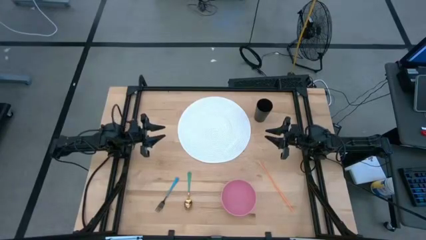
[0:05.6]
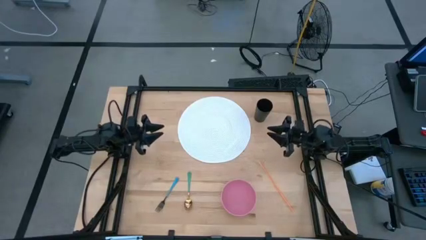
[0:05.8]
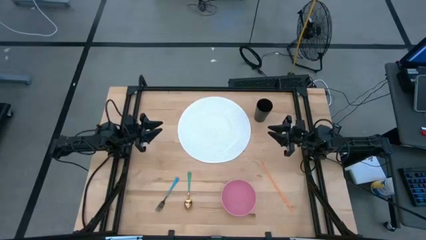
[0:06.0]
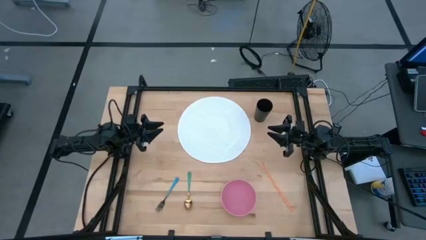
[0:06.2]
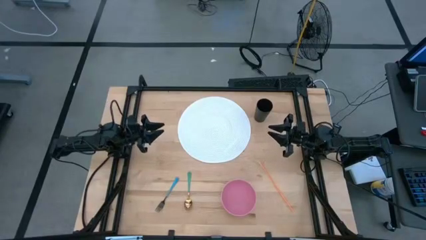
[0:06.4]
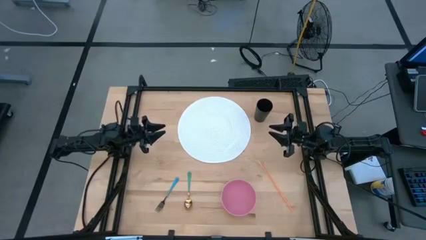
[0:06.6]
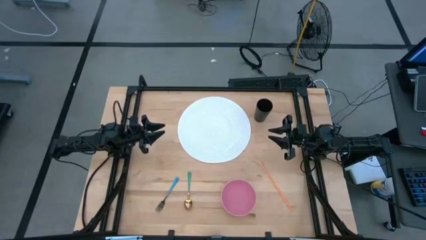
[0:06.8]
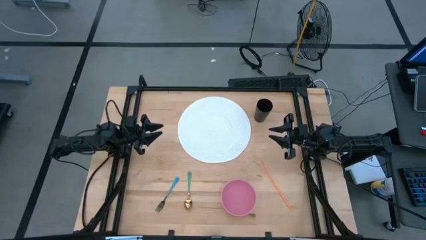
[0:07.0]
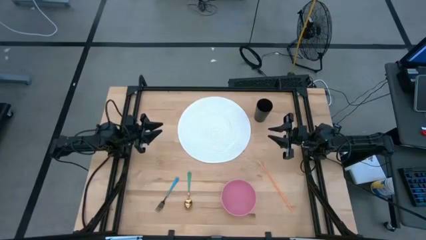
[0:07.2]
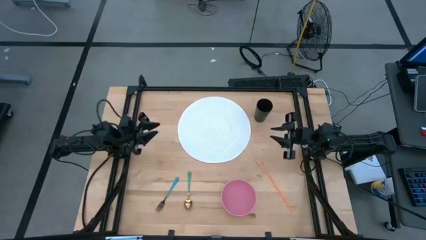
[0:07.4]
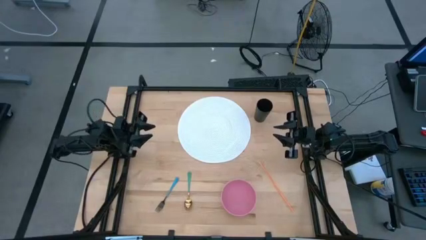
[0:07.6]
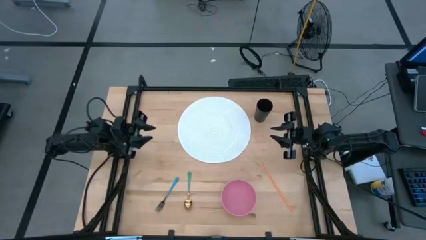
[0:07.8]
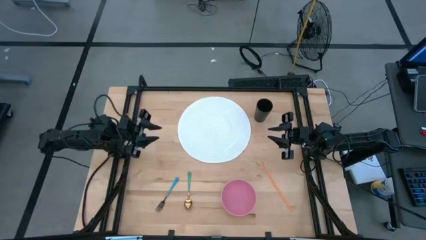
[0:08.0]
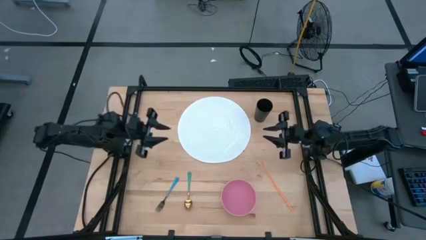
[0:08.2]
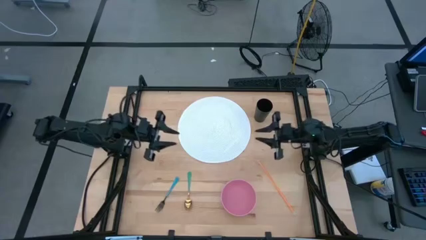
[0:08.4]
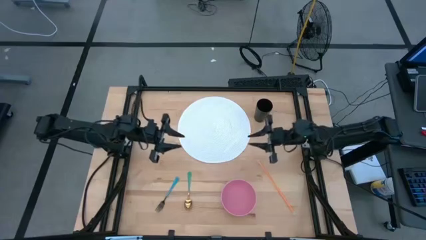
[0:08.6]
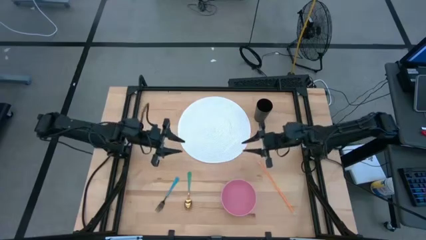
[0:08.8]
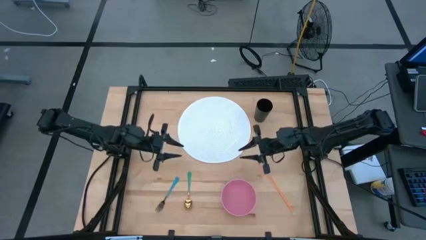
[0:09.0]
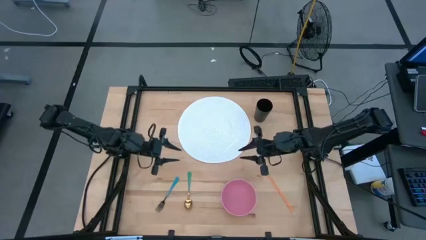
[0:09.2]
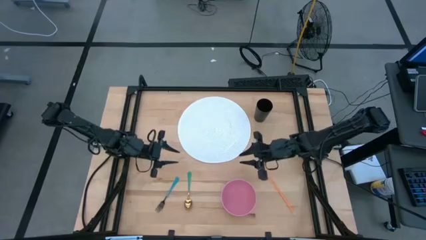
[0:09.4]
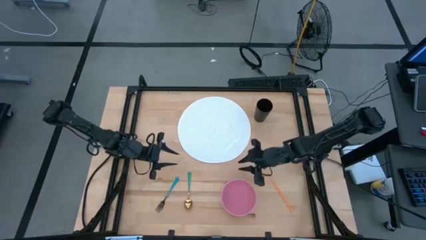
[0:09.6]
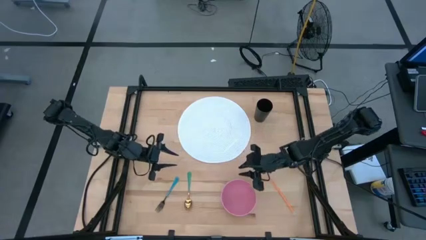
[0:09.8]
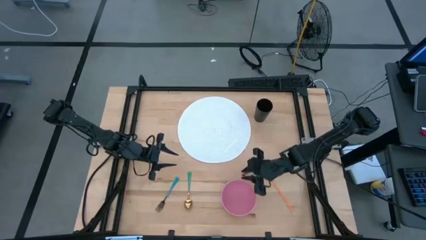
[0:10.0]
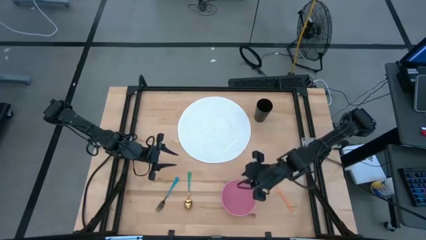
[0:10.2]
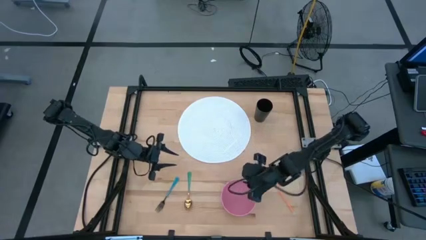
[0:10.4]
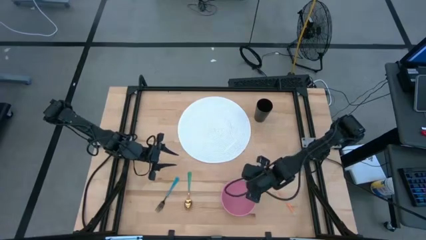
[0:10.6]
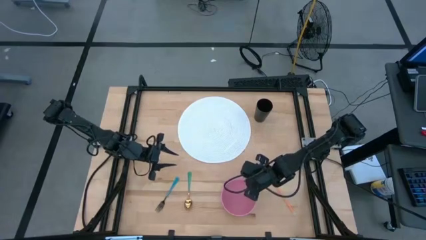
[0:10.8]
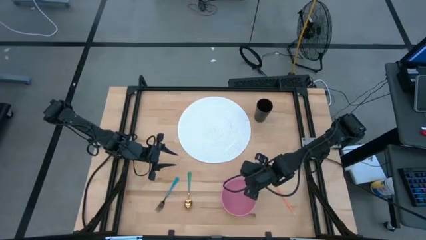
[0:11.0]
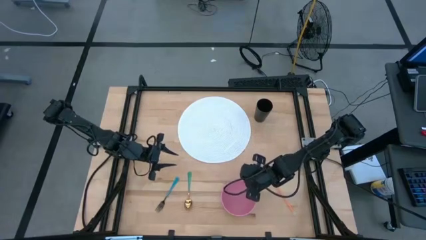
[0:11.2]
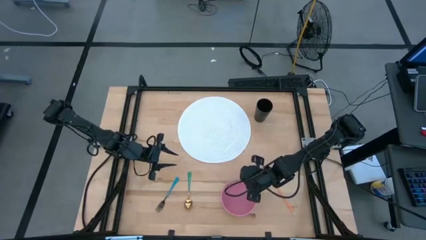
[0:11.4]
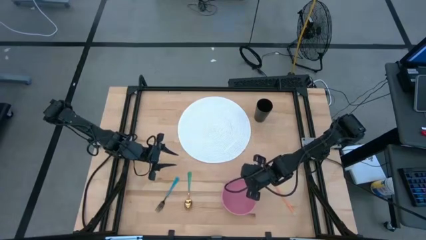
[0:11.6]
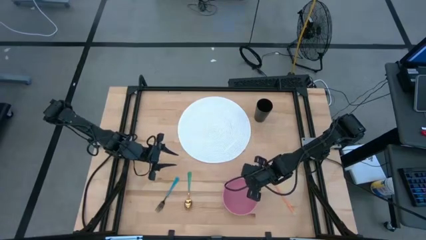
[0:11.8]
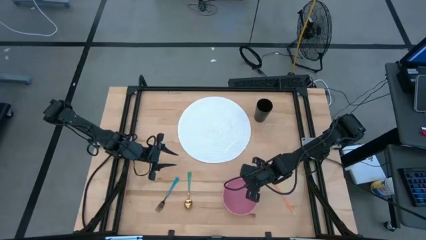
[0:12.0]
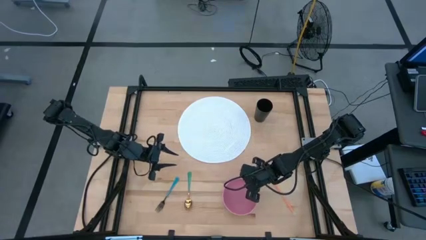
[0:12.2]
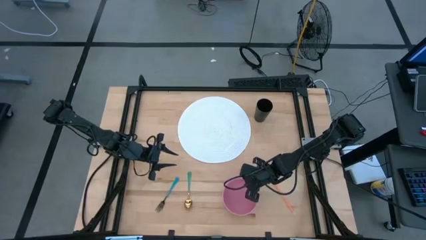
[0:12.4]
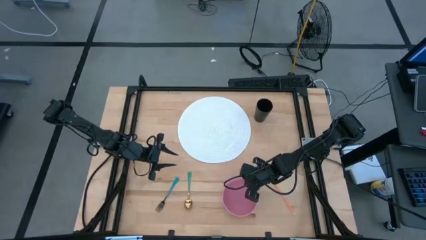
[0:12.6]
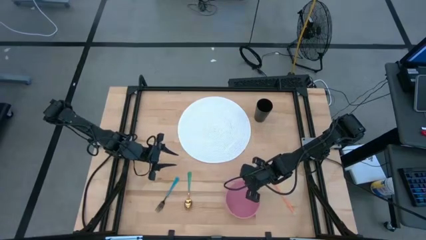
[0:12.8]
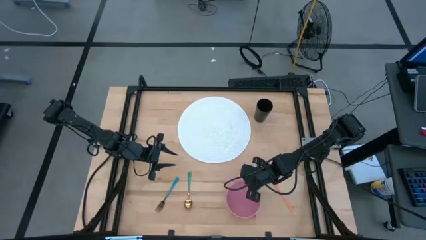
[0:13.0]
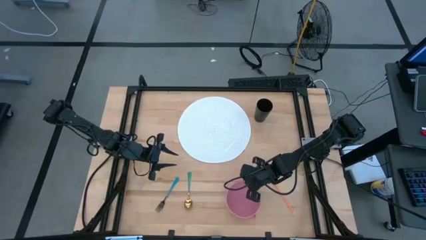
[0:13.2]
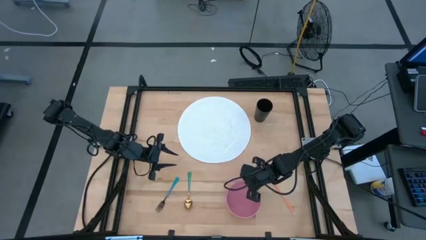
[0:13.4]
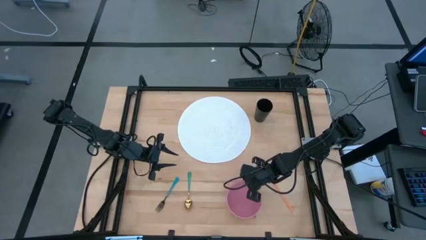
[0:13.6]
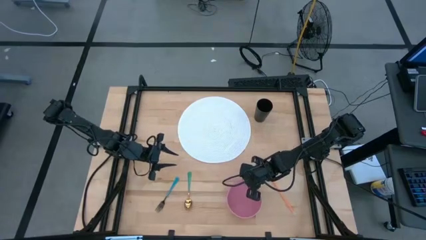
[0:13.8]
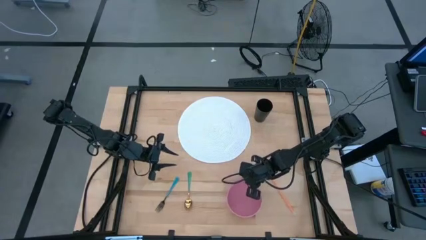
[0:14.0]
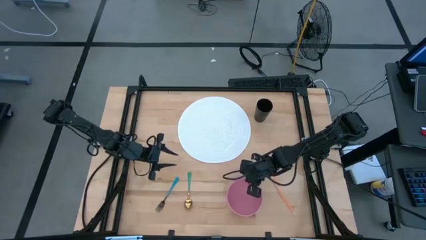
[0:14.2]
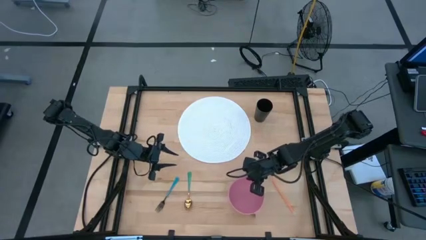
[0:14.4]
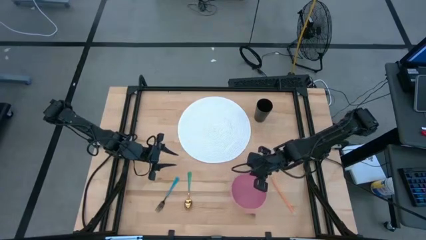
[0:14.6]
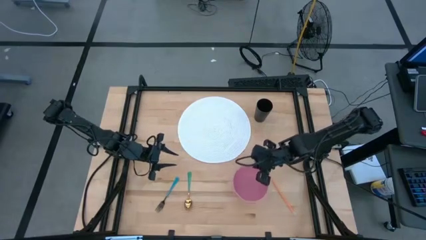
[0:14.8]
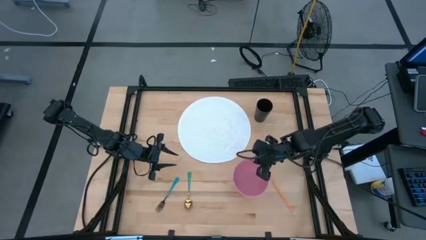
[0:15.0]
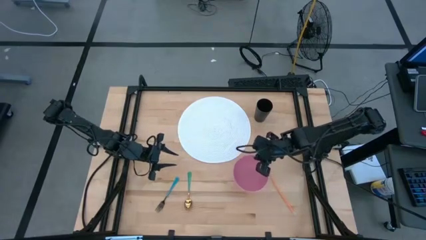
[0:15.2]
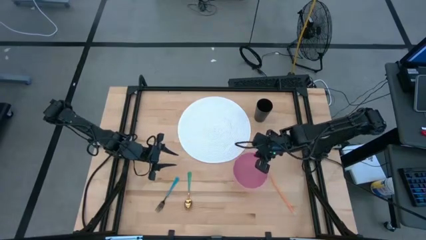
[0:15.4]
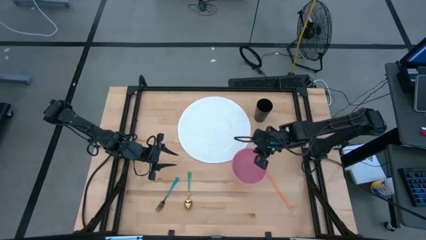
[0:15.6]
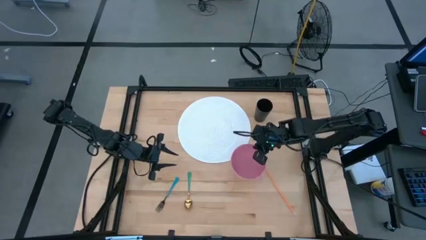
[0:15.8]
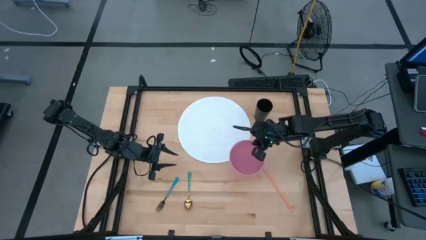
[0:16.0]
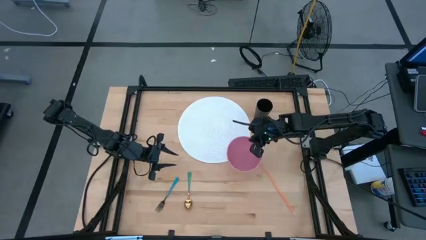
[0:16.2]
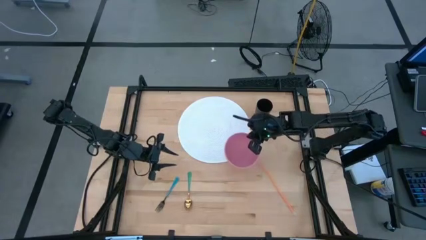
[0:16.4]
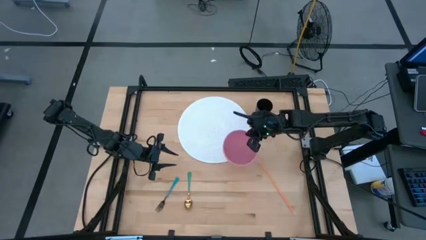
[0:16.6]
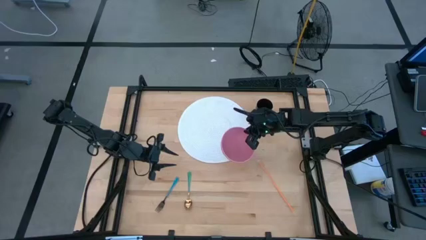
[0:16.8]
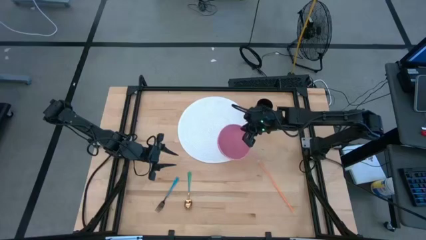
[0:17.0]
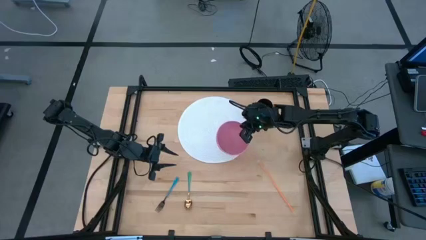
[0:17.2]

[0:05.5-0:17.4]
Task: Pick & Place Utensil
Put the pink bowl on the white mat
